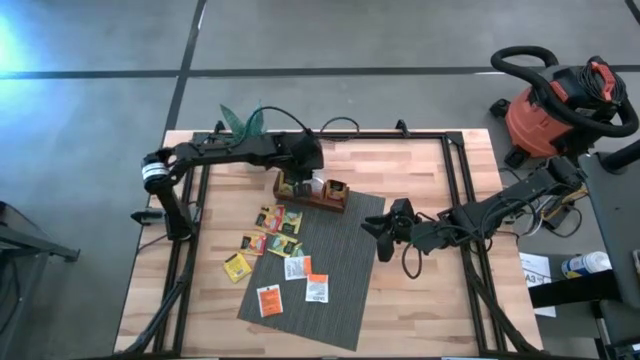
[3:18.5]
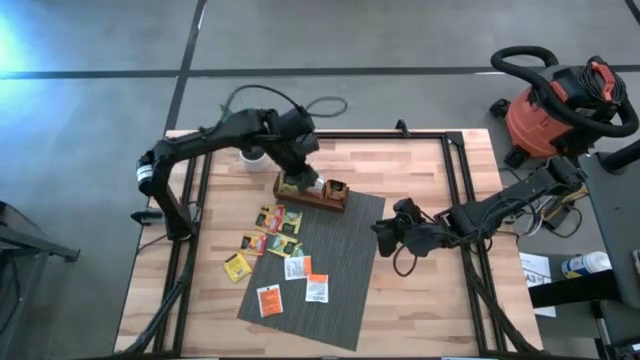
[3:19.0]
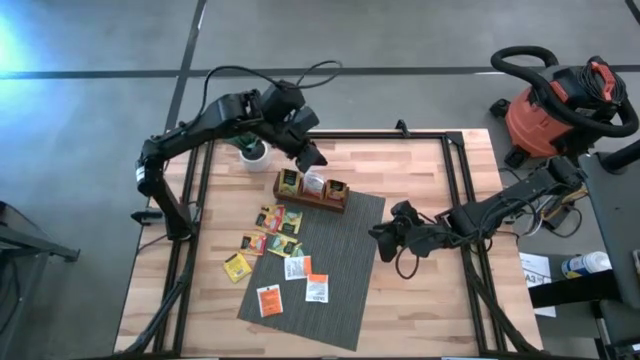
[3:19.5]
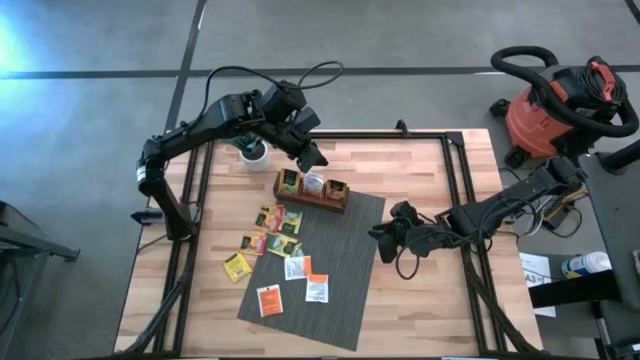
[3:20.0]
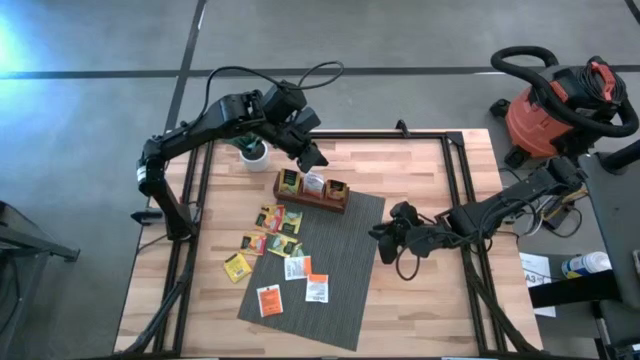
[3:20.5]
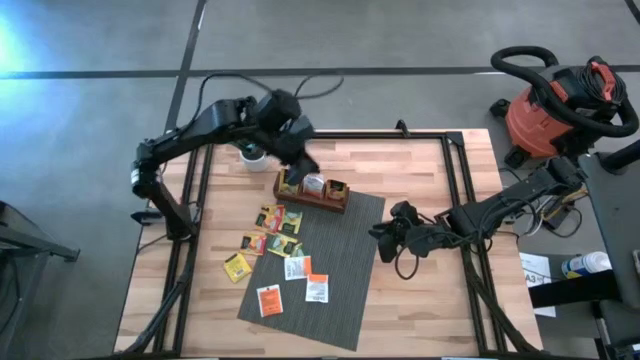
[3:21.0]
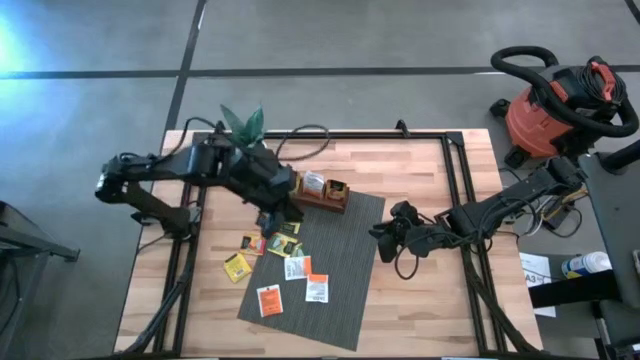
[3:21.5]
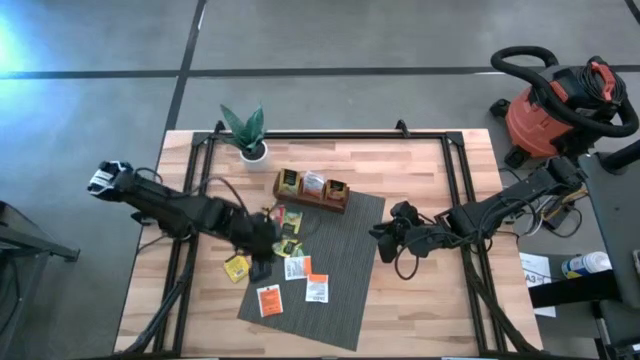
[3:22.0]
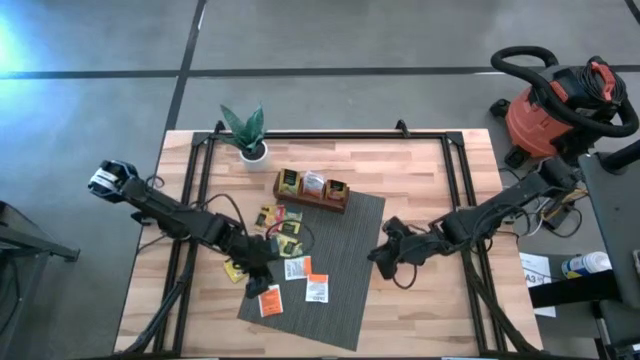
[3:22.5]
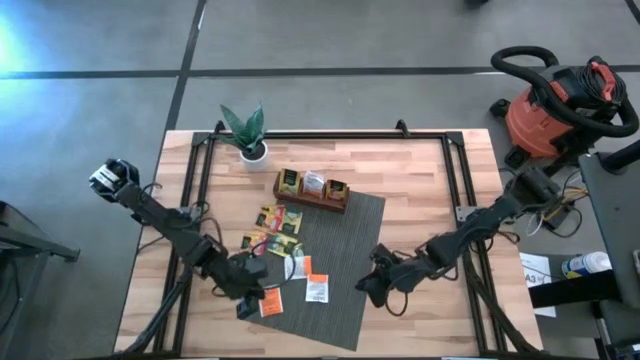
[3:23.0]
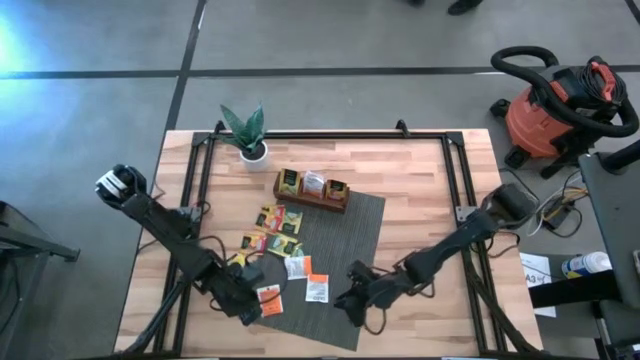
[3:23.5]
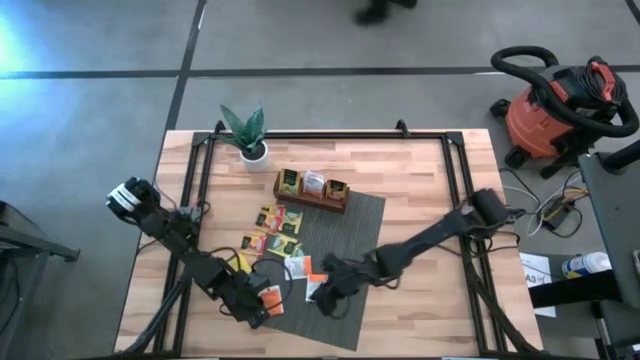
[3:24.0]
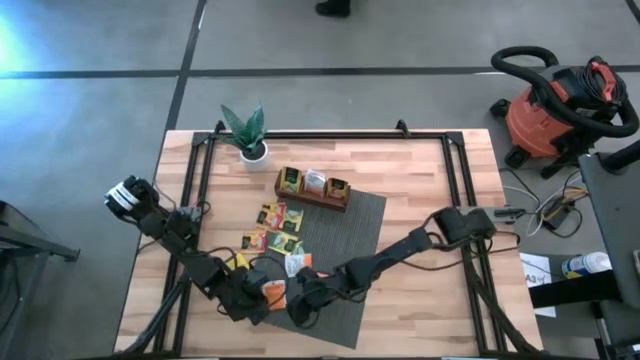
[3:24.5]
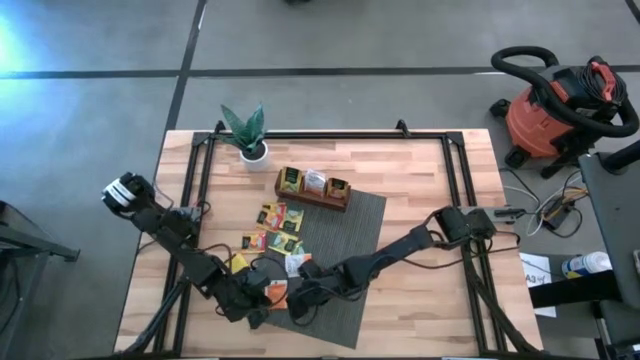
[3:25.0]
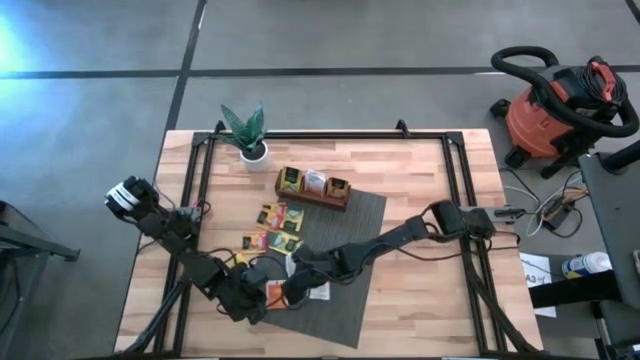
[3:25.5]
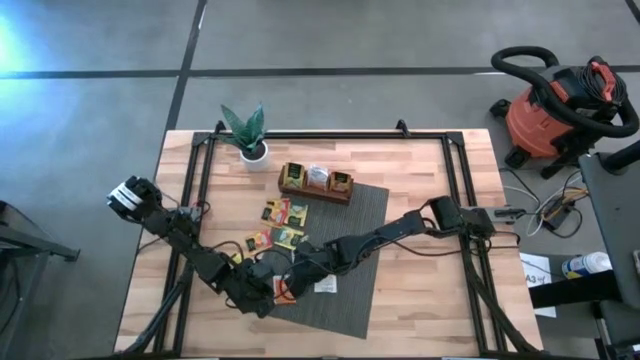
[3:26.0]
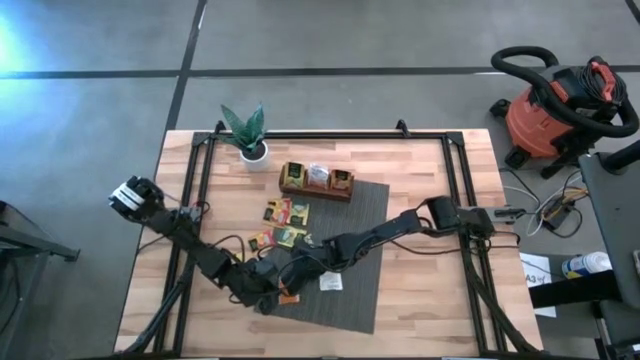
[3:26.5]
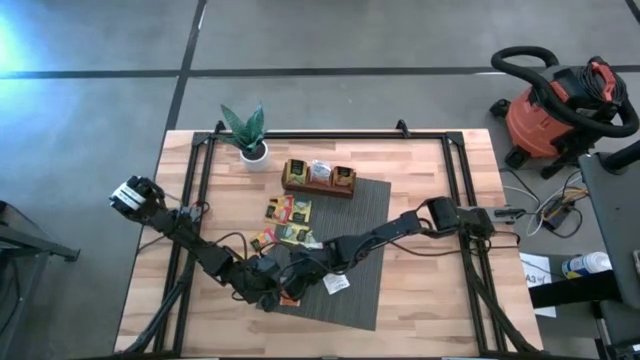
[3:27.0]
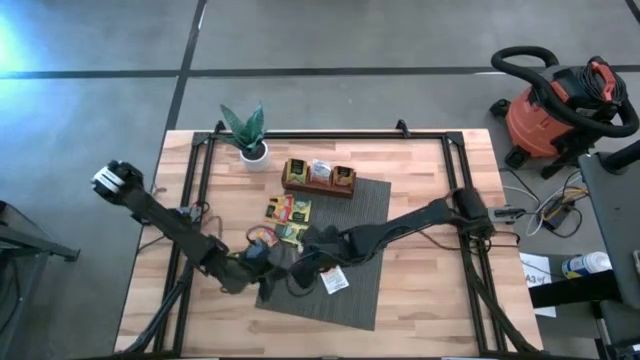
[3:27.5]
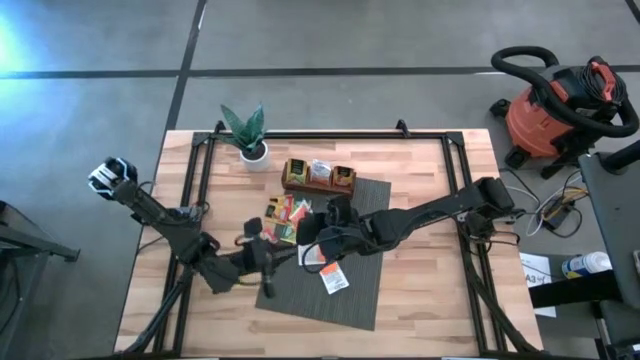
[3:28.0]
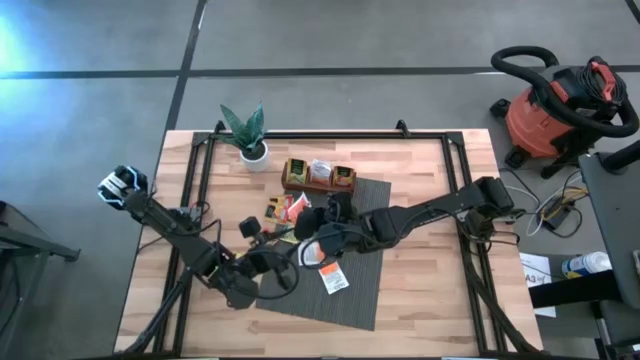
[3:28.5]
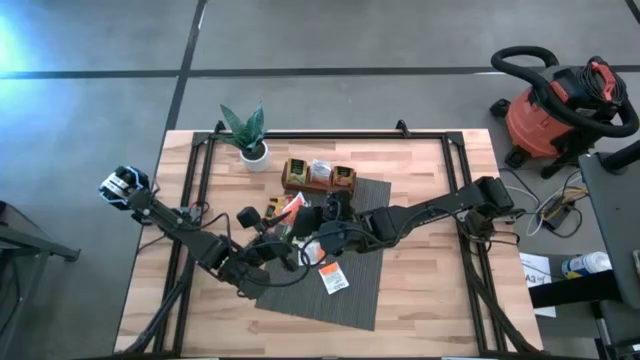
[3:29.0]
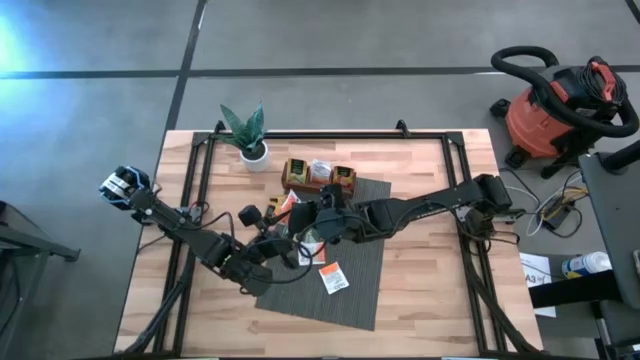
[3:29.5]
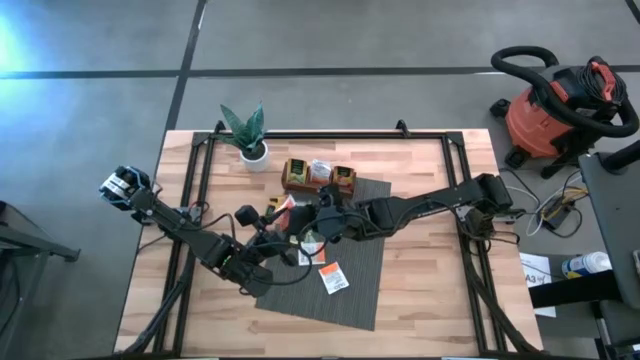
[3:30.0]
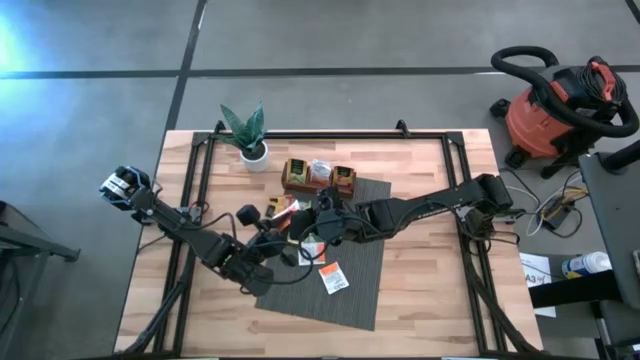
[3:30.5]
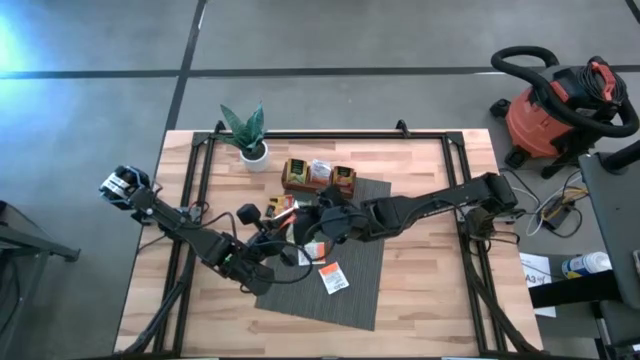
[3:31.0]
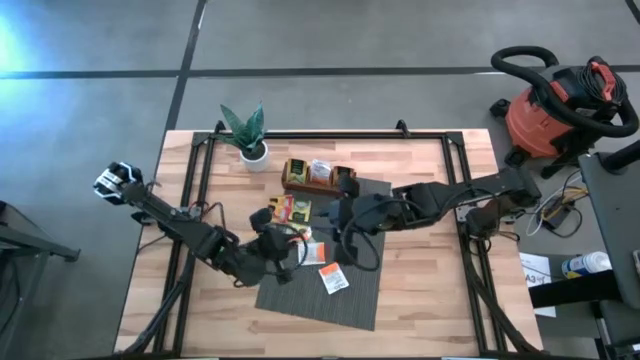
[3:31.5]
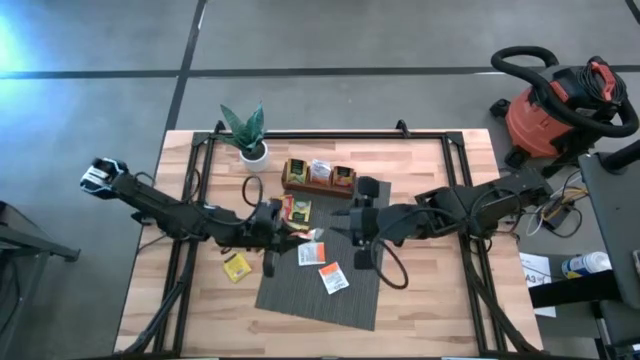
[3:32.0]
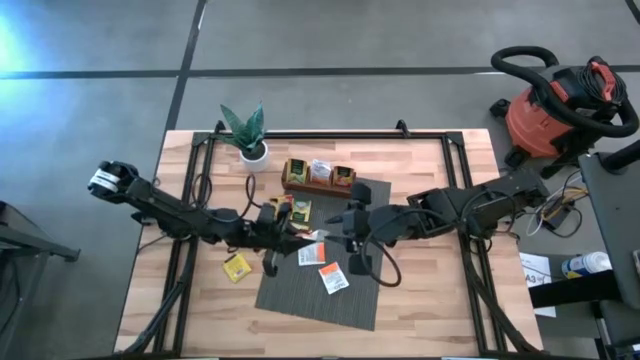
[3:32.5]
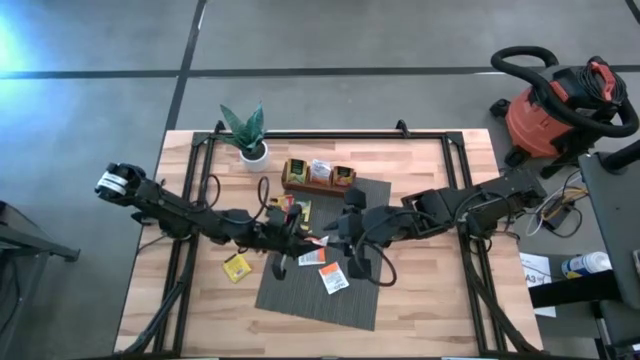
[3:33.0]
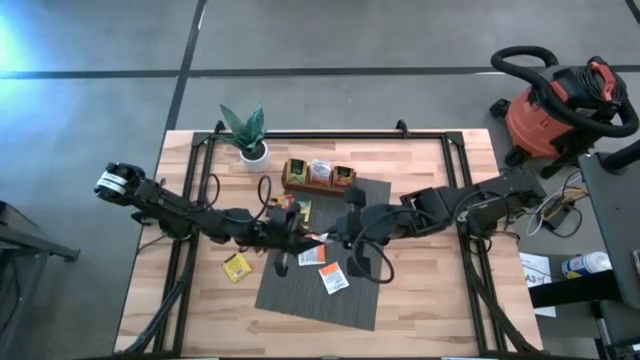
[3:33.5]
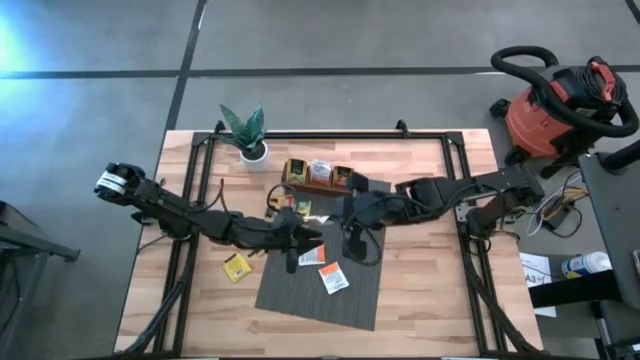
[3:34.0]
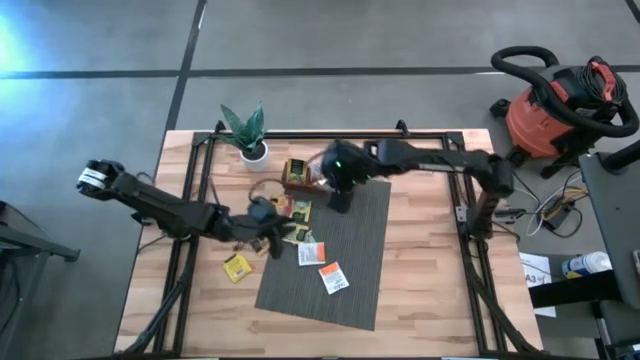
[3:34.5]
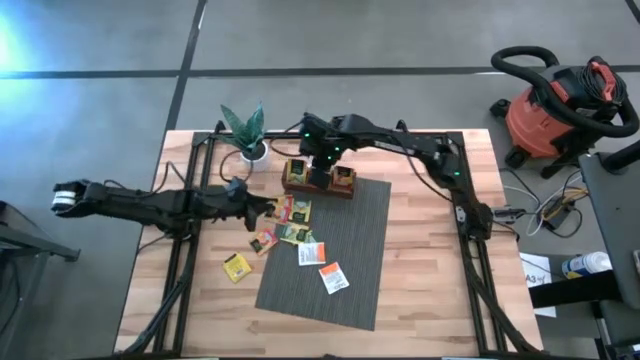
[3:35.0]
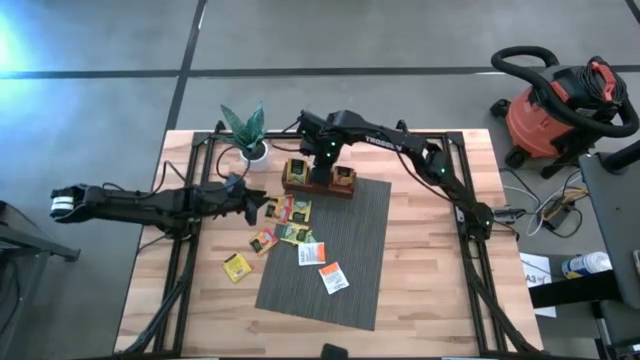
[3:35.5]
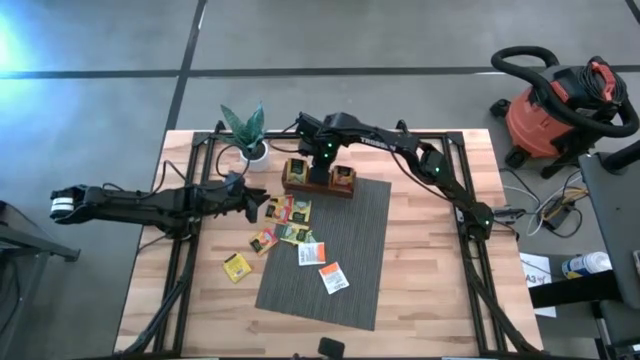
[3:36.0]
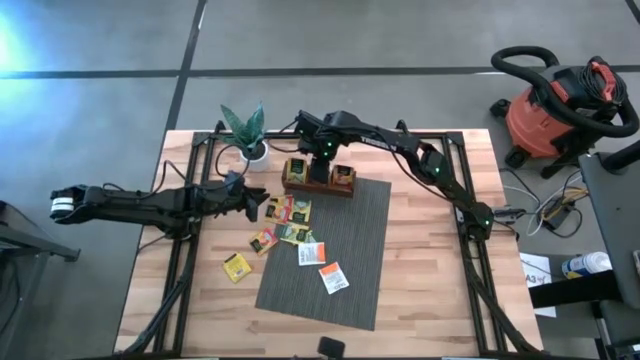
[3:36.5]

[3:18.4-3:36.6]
Task: Pick & Place Tea
Put the left white tea bag into the middle compartment of the wooden organizer

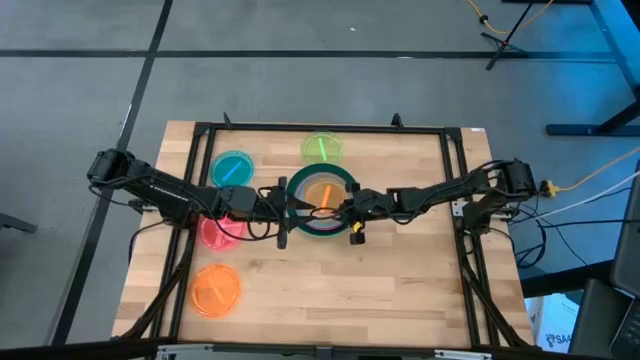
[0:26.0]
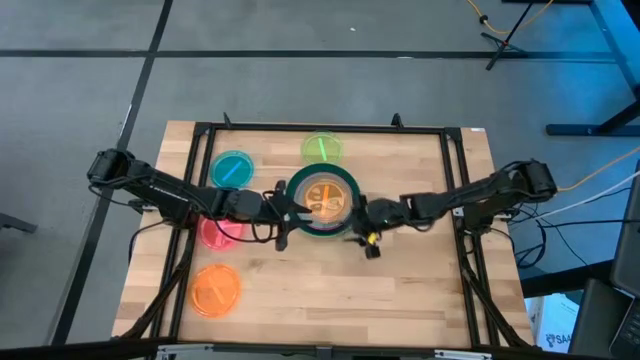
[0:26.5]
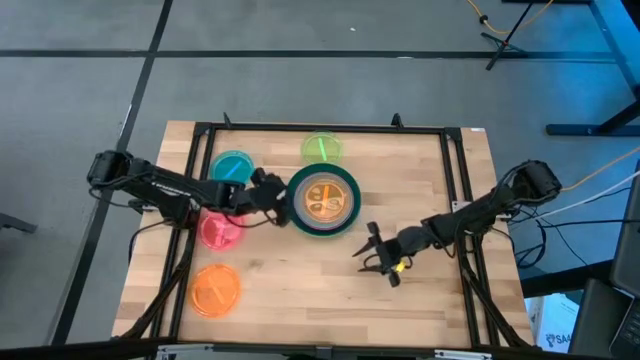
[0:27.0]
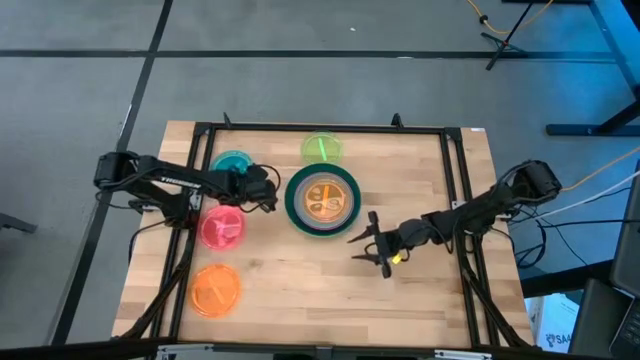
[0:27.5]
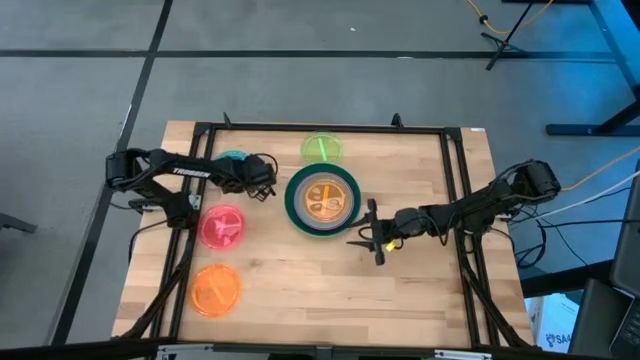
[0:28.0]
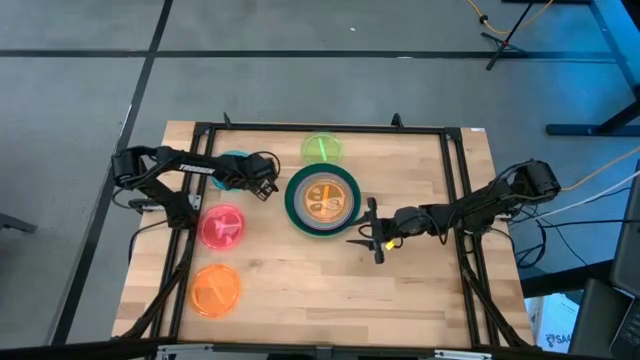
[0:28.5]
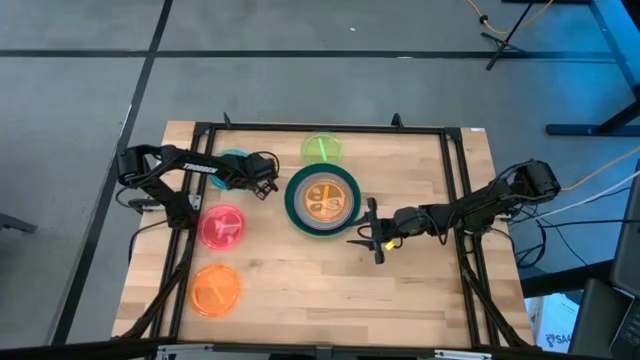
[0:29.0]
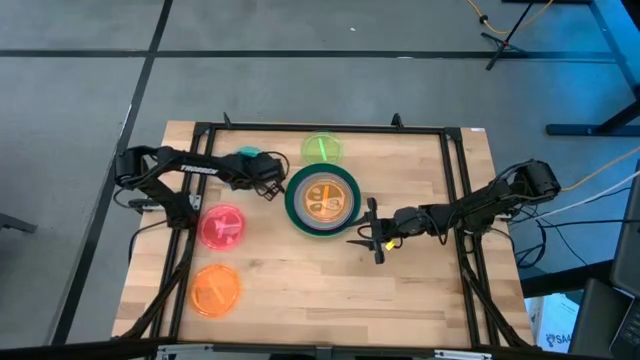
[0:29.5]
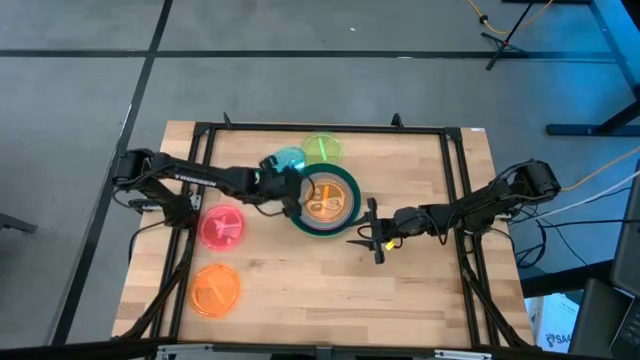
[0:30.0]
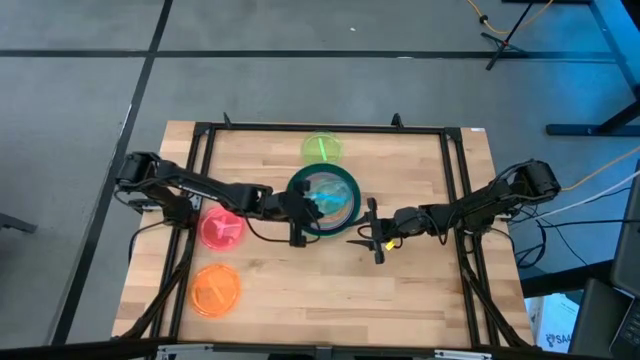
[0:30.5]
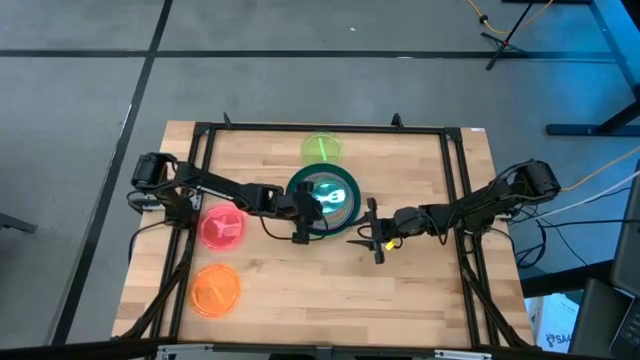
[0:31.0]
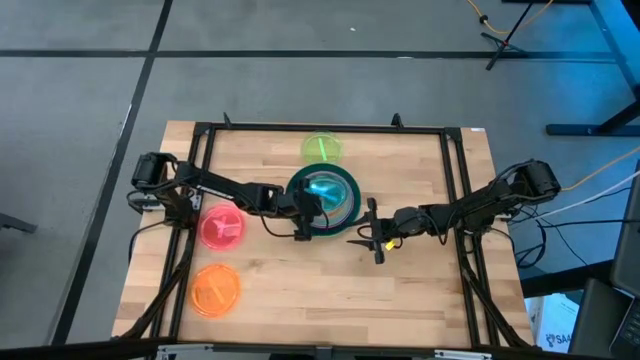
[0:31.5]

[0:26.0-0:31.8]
Task: Stack plastic plates
Stack the blue plate on top of the orange plate
